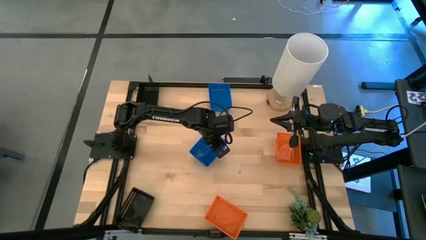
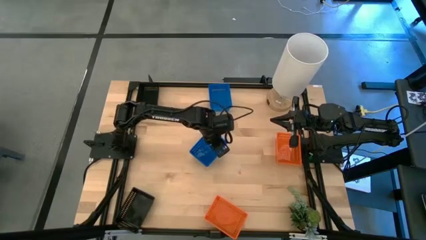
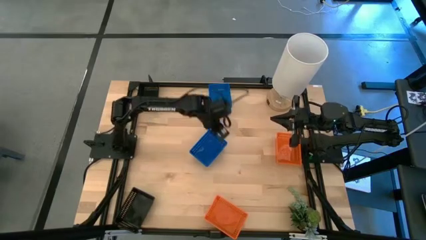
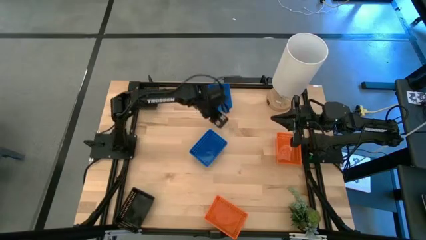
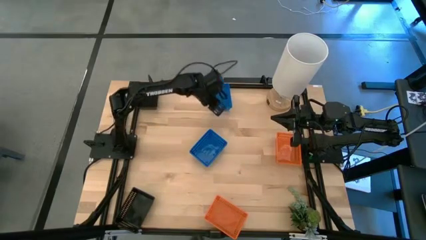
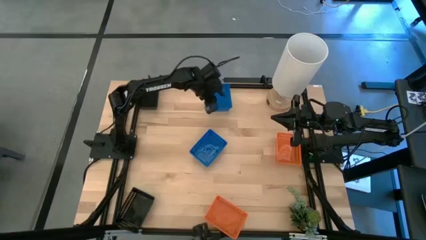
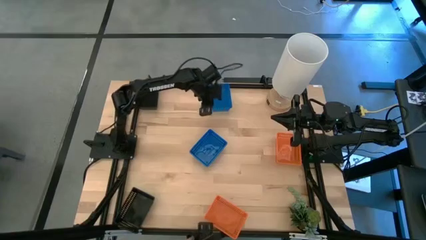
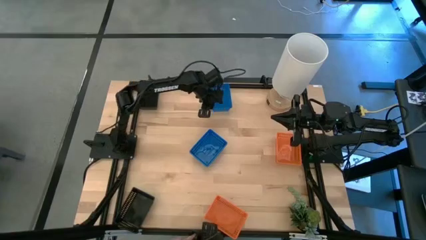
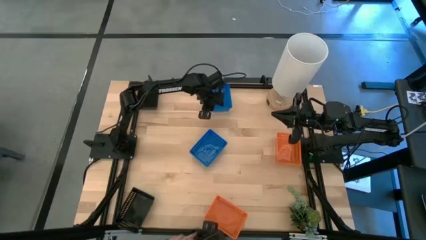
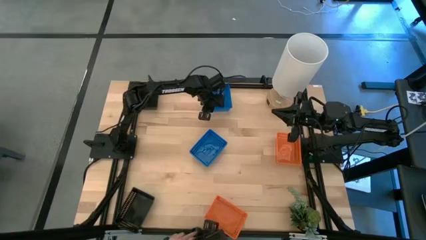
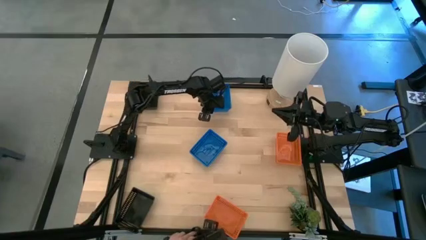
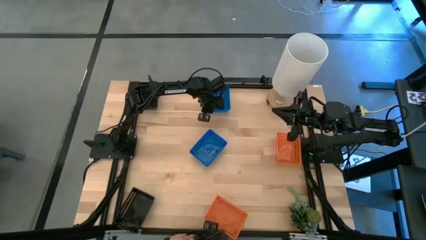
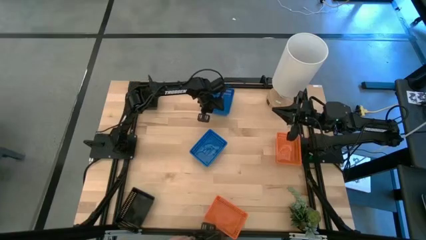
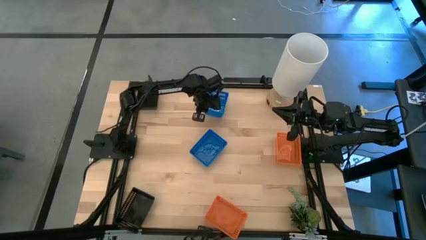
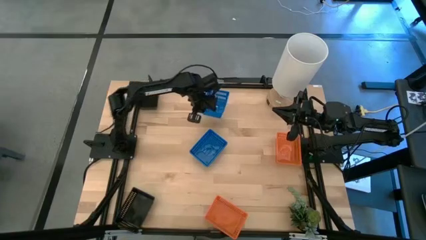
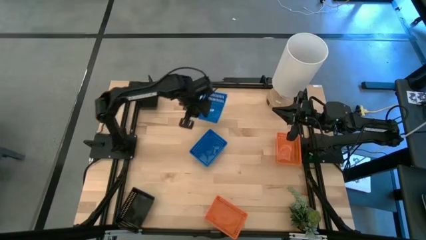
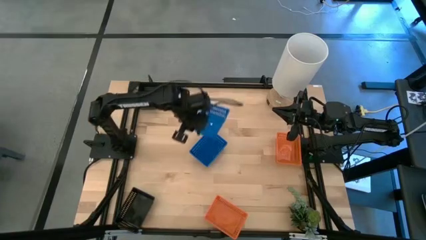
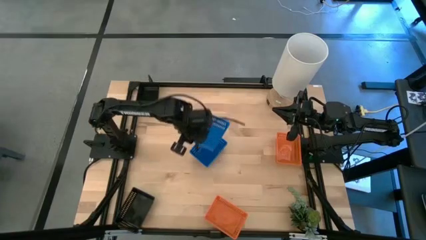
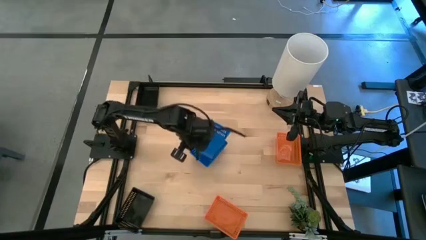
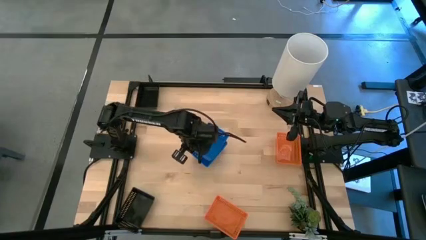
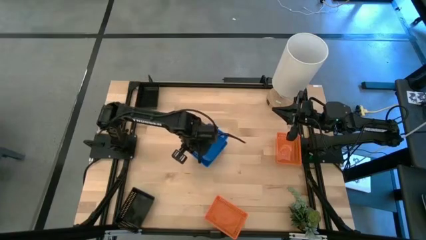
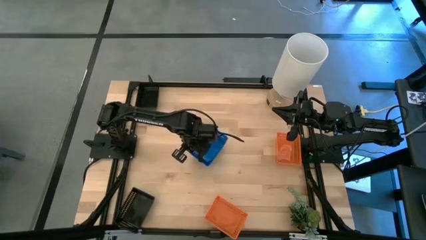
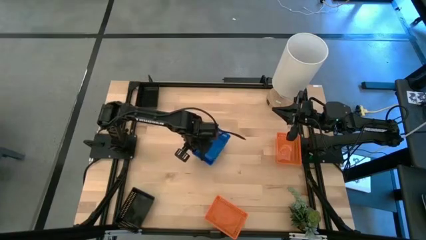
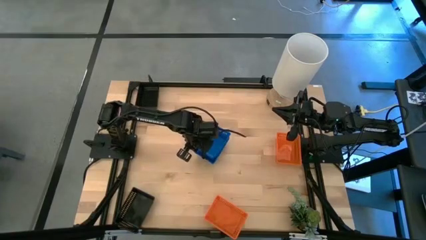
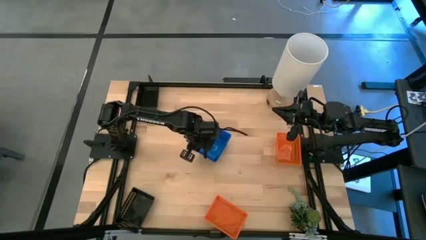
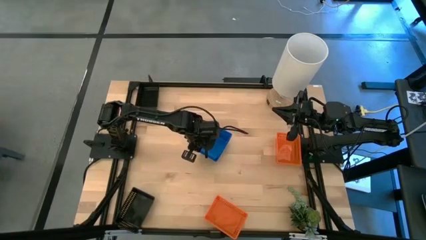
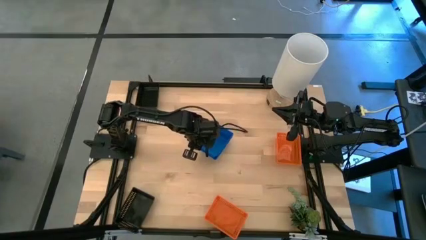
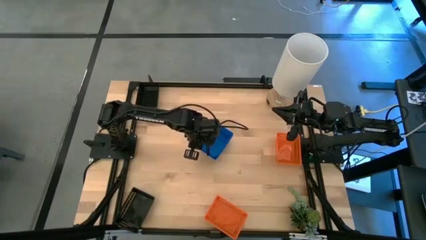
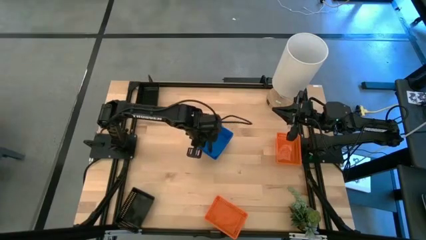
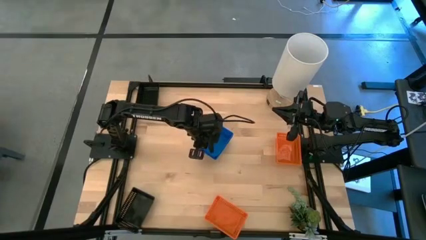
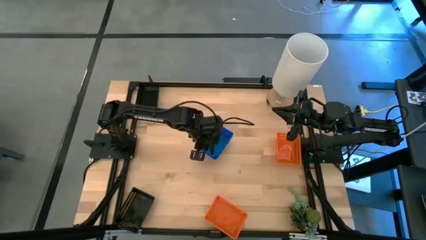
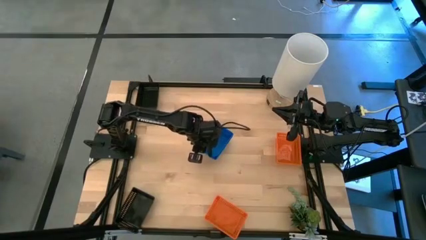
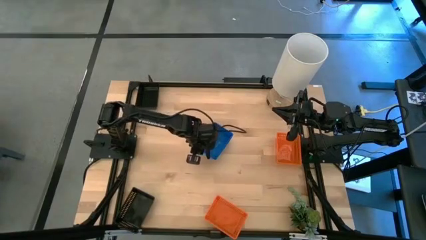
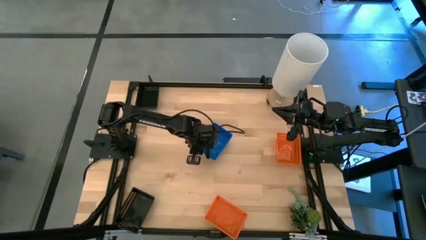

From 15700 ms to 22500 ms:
Stack the top blue bin on the bottom blue bin

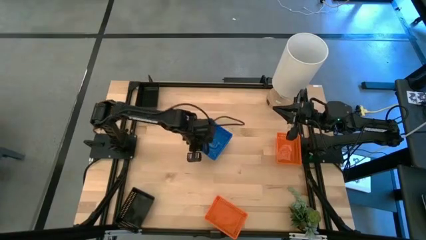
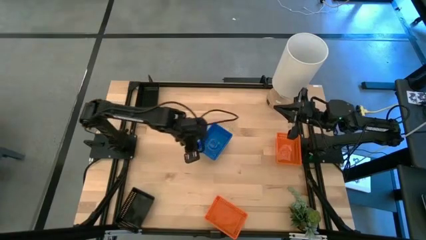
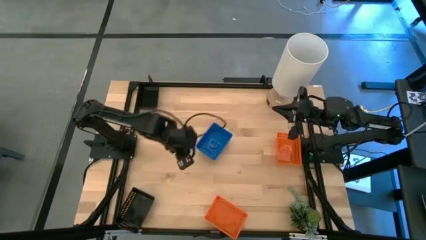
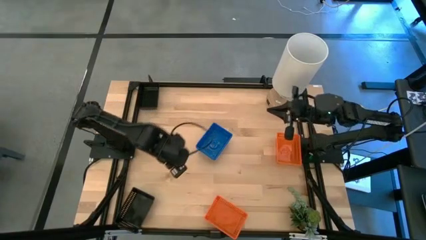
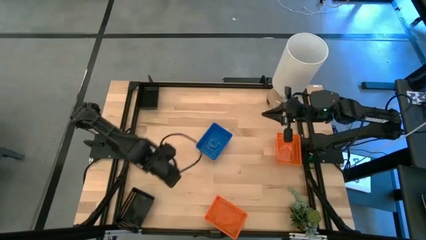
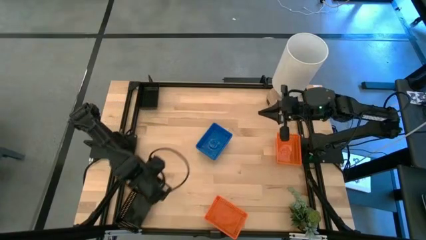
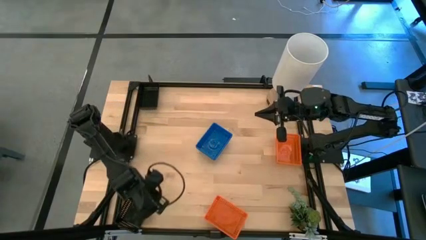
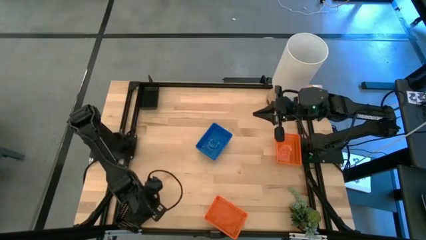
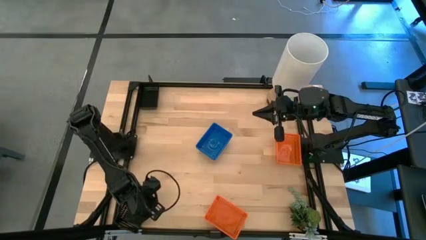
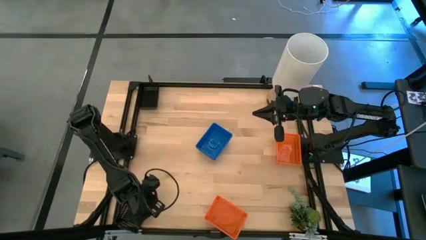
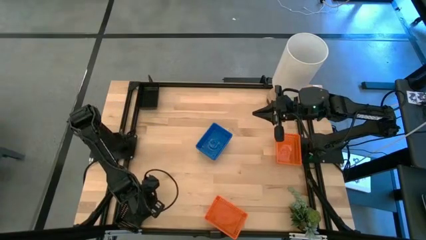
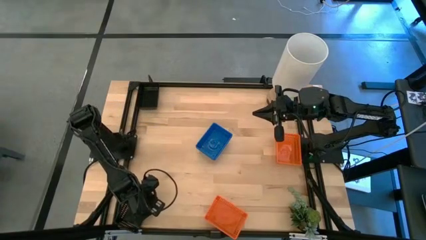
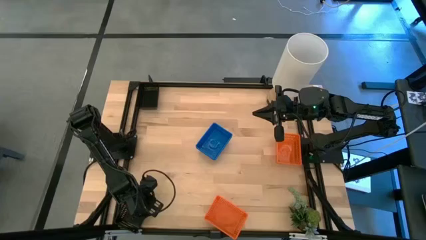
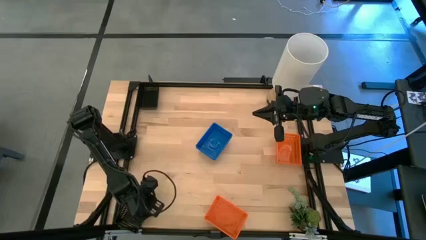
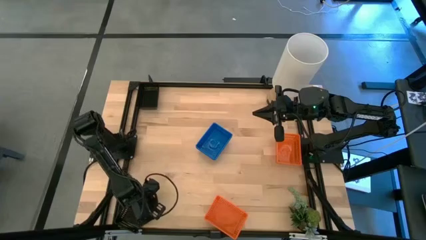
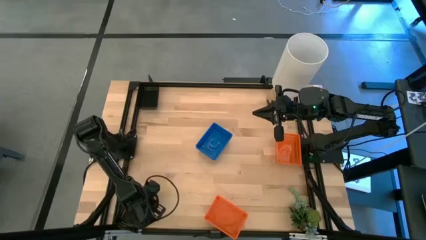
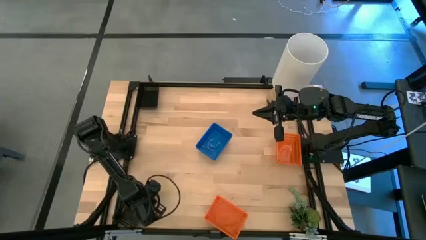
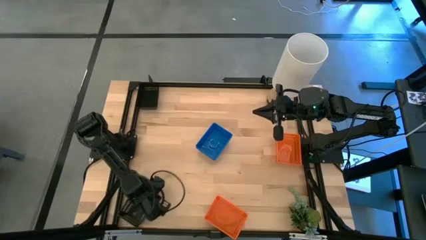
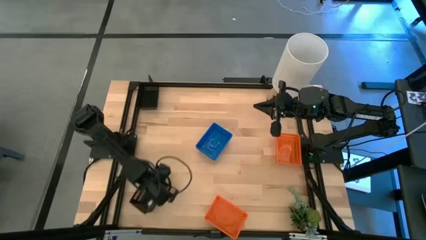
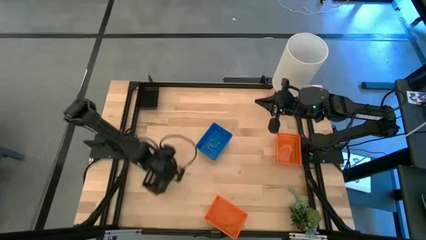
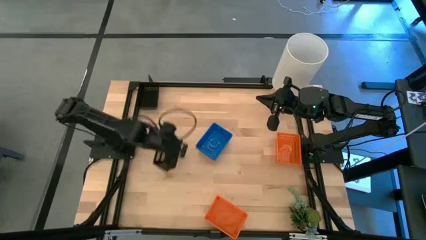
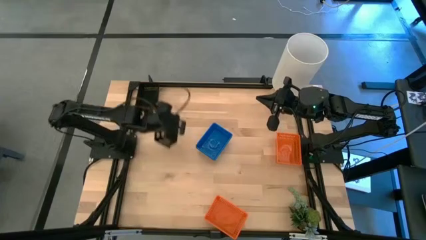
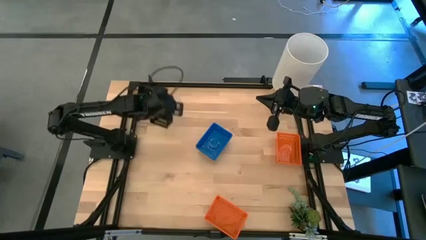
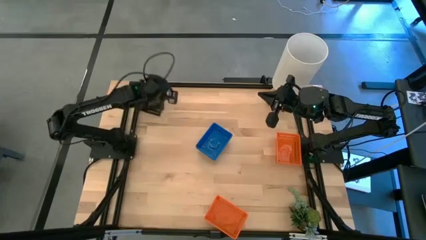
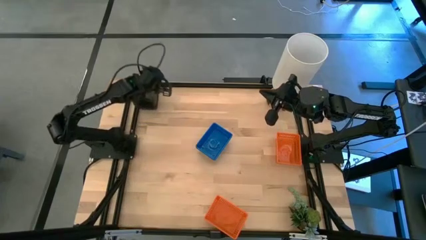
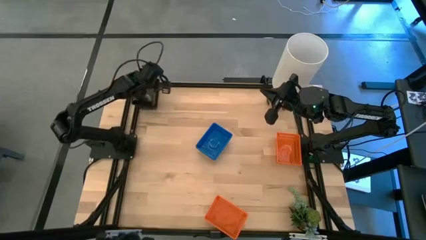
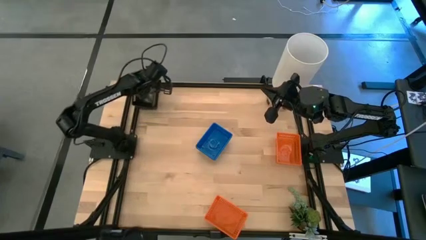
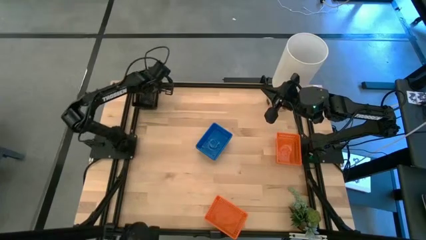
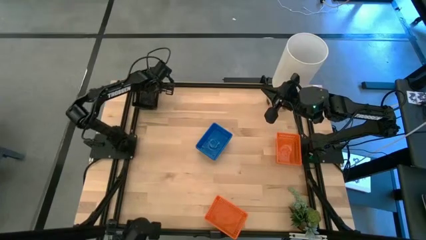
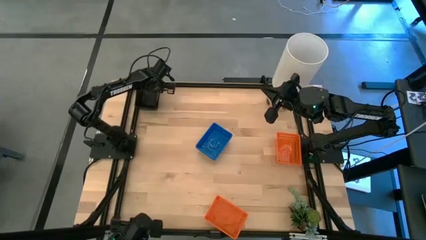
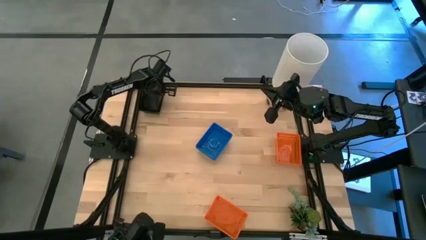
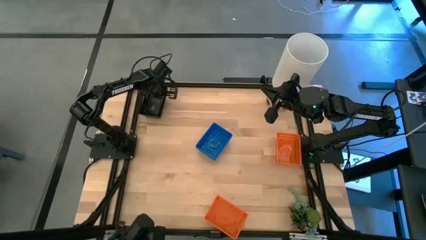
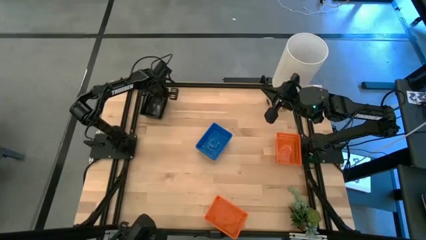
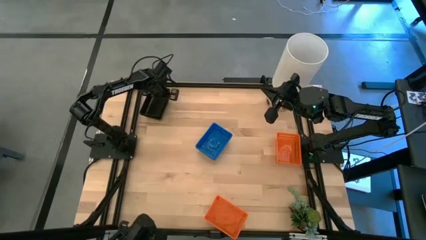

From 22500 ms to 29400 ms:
Stack the bottom black bin on the top black bin
